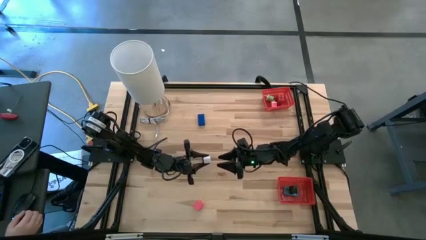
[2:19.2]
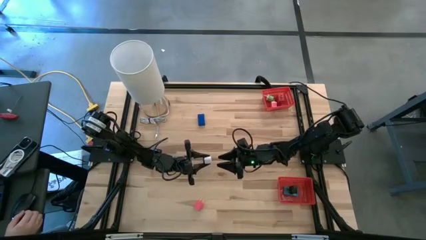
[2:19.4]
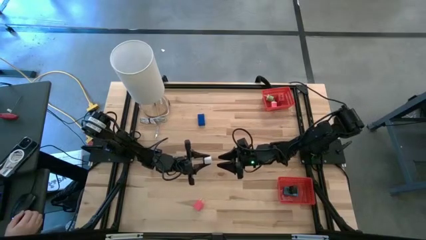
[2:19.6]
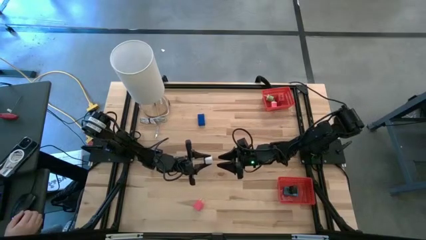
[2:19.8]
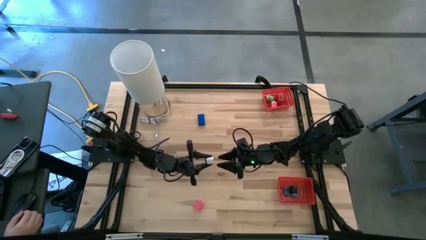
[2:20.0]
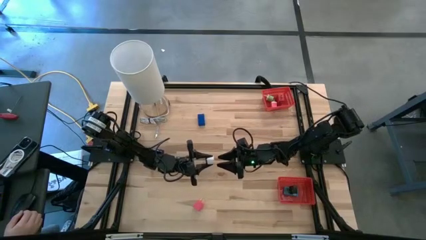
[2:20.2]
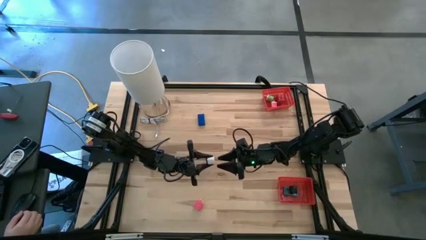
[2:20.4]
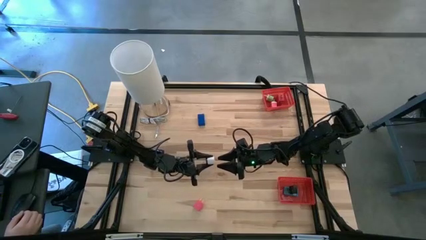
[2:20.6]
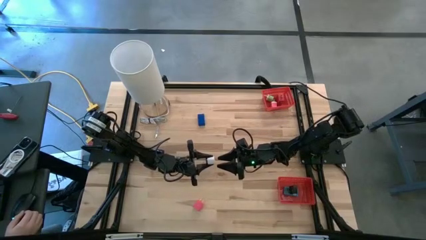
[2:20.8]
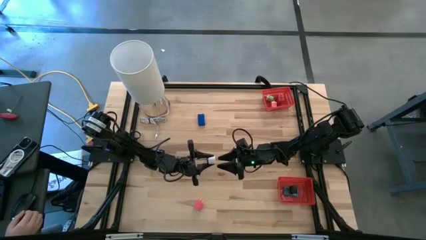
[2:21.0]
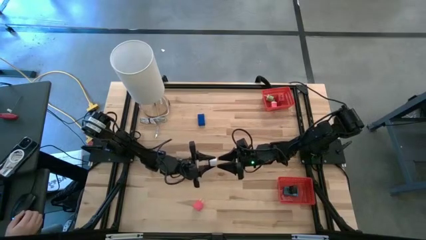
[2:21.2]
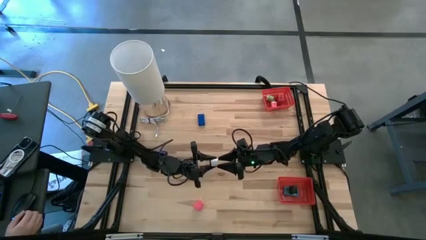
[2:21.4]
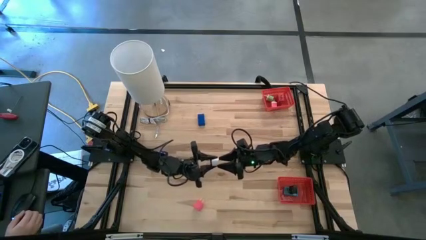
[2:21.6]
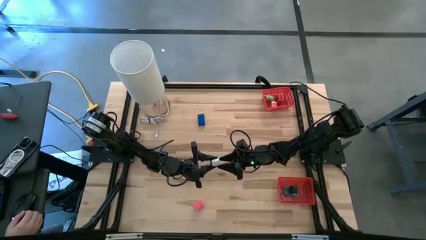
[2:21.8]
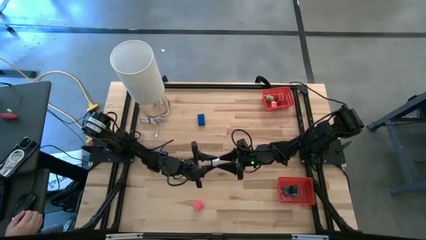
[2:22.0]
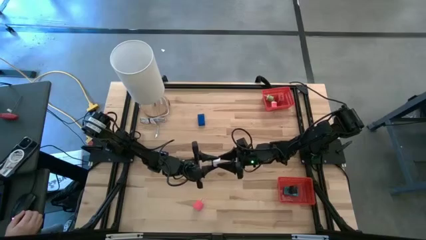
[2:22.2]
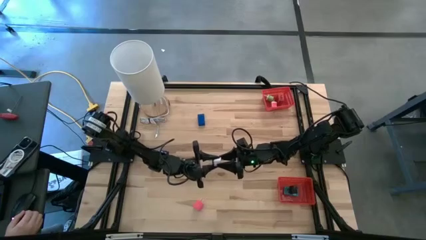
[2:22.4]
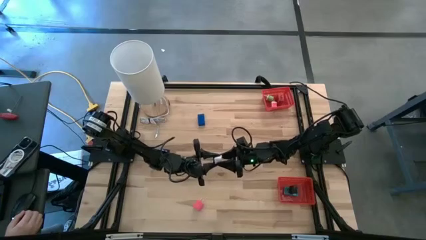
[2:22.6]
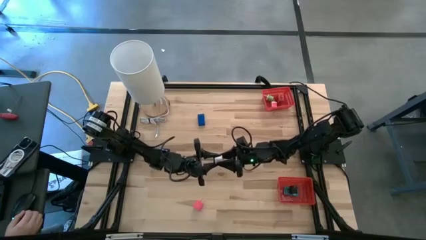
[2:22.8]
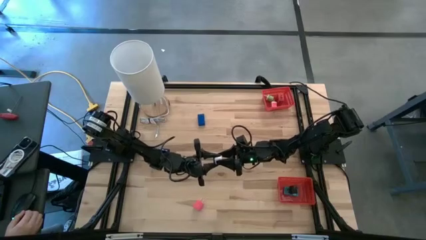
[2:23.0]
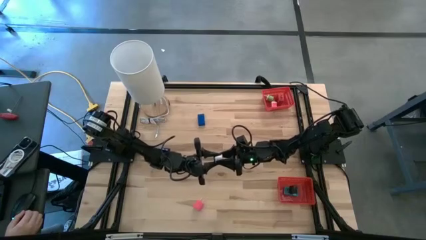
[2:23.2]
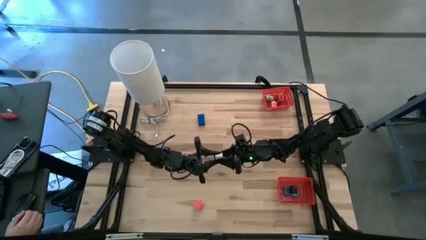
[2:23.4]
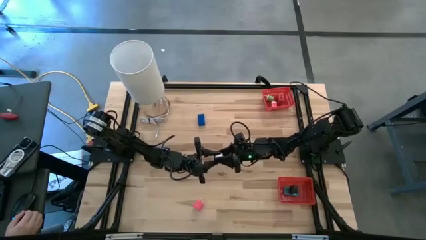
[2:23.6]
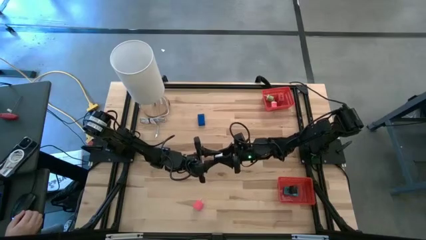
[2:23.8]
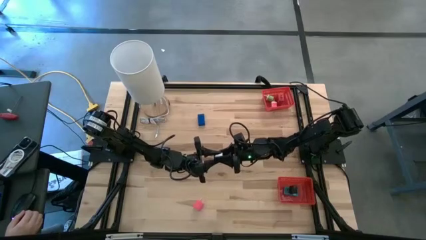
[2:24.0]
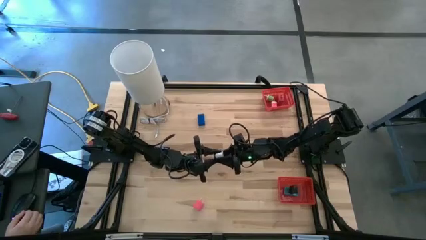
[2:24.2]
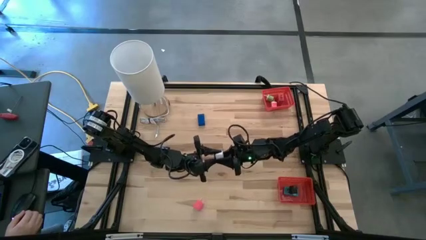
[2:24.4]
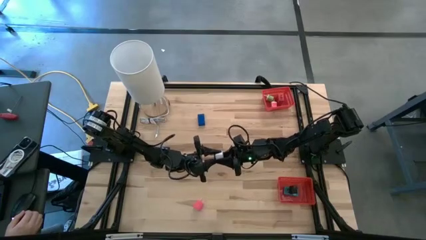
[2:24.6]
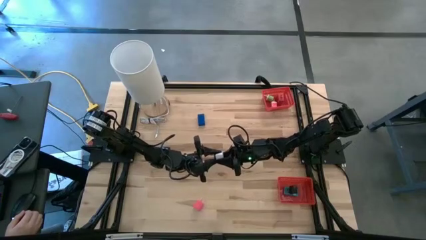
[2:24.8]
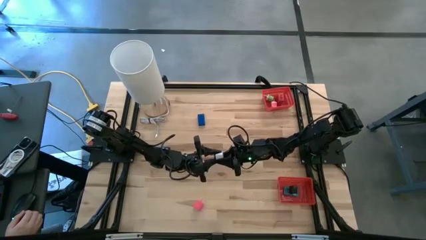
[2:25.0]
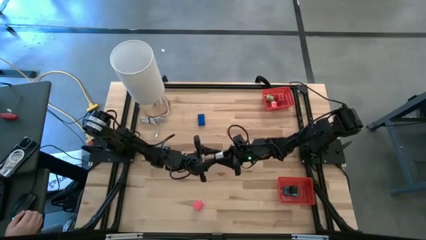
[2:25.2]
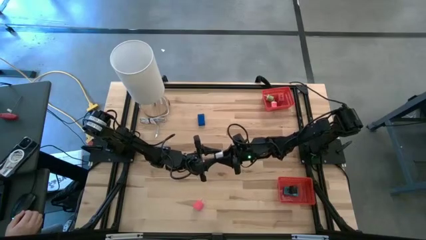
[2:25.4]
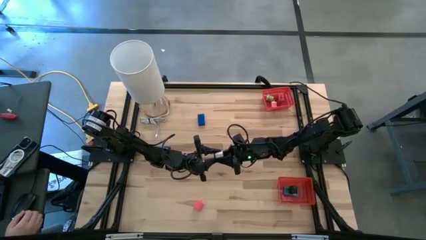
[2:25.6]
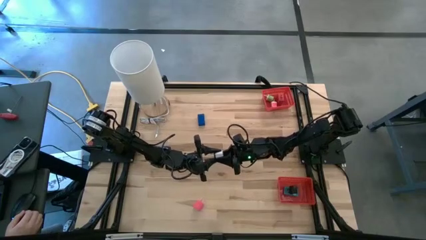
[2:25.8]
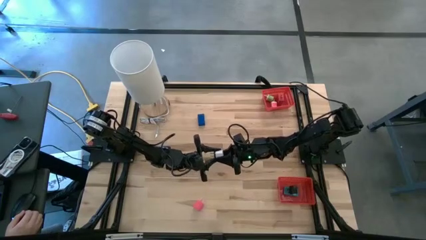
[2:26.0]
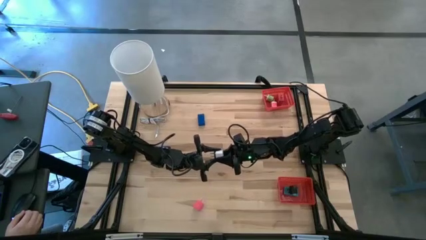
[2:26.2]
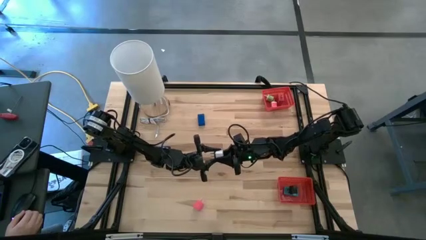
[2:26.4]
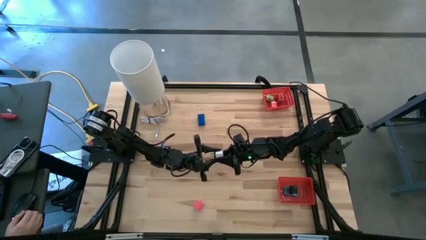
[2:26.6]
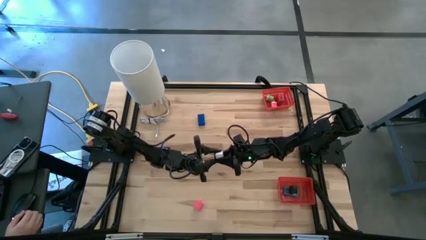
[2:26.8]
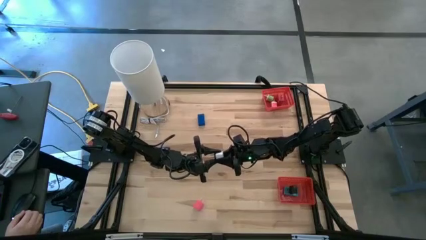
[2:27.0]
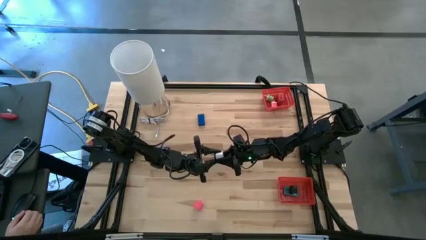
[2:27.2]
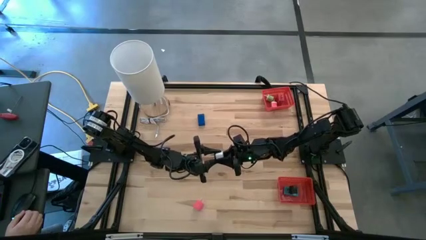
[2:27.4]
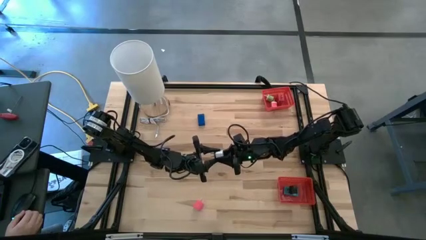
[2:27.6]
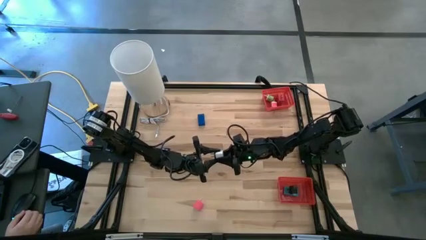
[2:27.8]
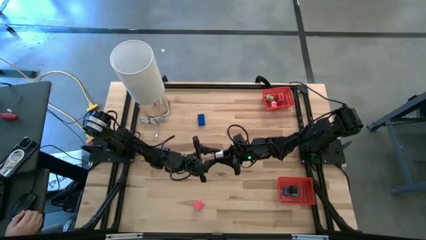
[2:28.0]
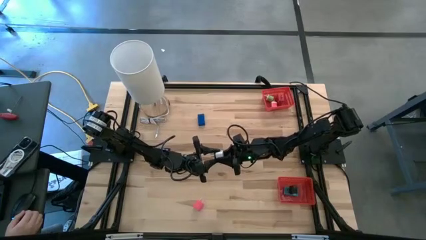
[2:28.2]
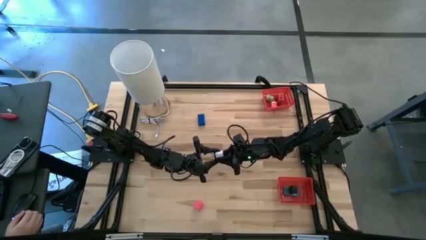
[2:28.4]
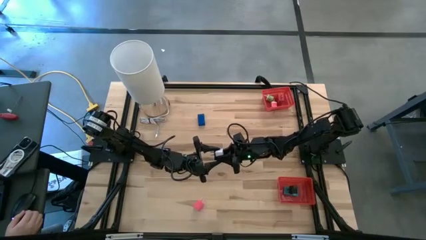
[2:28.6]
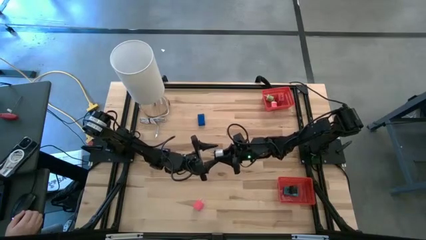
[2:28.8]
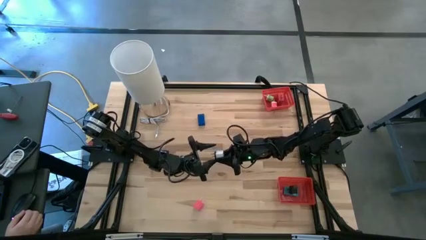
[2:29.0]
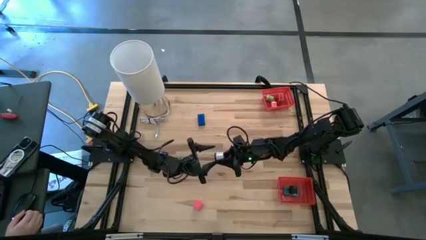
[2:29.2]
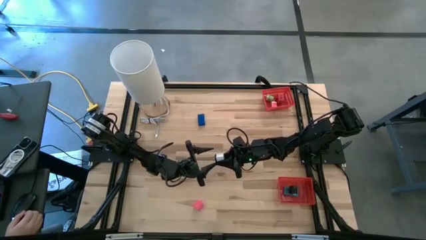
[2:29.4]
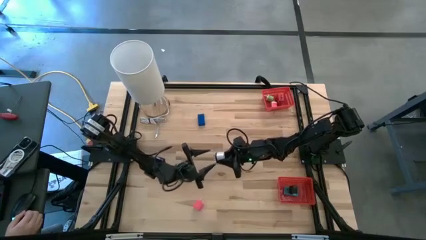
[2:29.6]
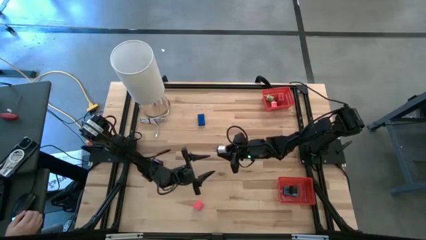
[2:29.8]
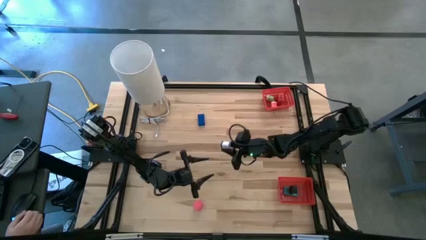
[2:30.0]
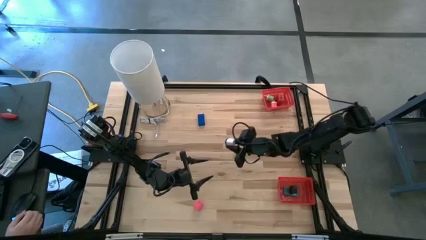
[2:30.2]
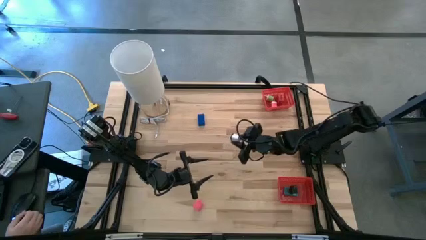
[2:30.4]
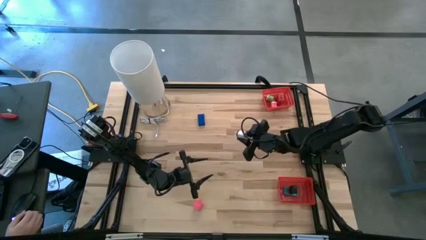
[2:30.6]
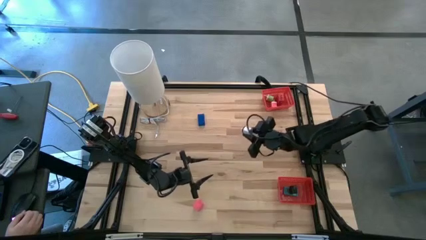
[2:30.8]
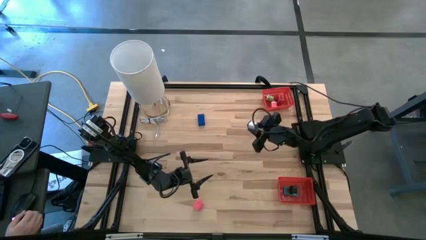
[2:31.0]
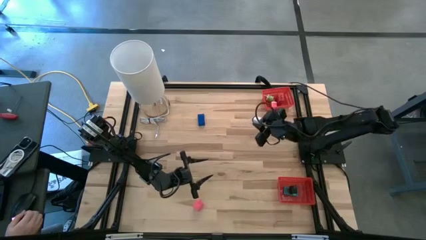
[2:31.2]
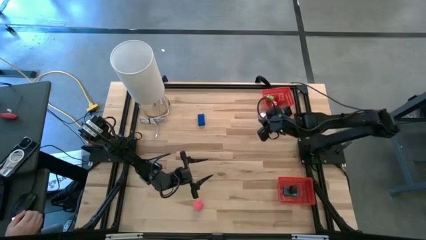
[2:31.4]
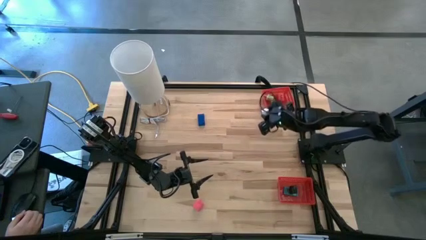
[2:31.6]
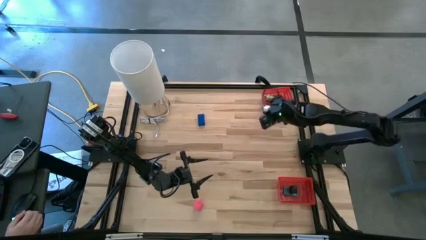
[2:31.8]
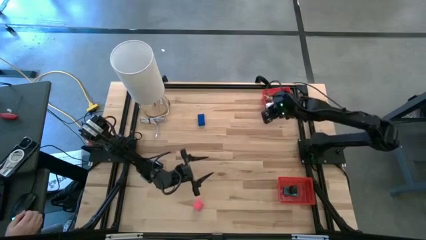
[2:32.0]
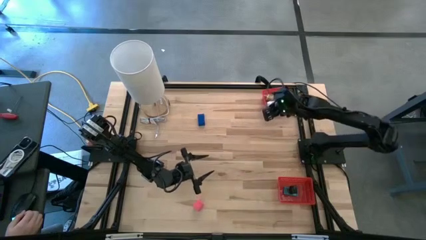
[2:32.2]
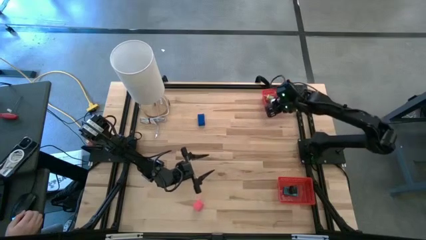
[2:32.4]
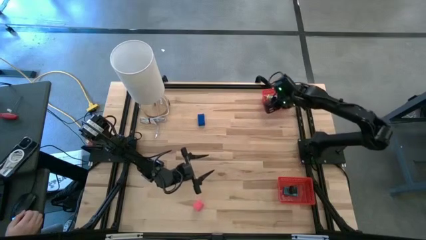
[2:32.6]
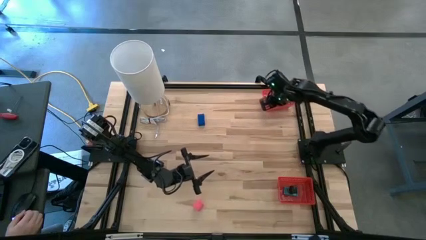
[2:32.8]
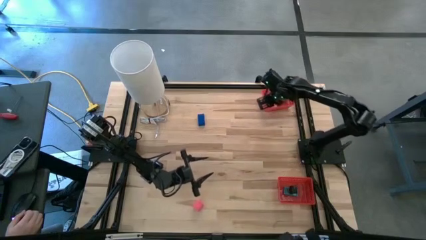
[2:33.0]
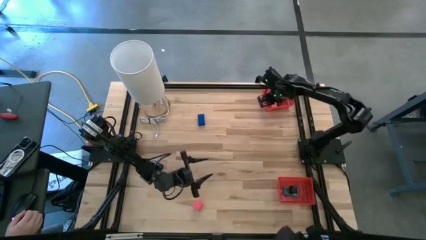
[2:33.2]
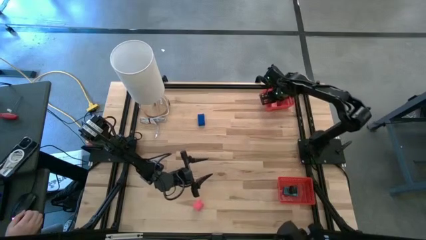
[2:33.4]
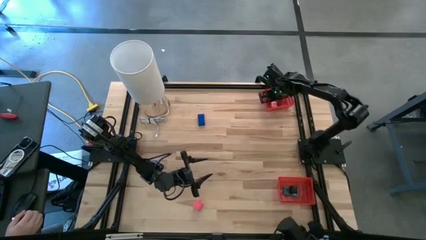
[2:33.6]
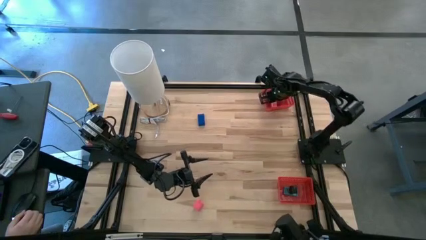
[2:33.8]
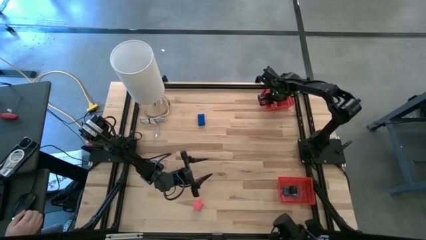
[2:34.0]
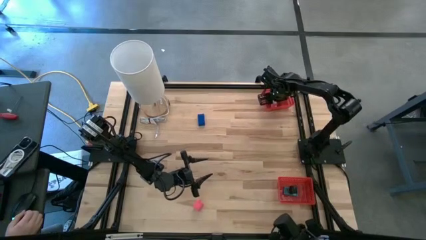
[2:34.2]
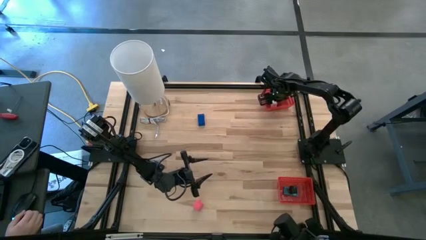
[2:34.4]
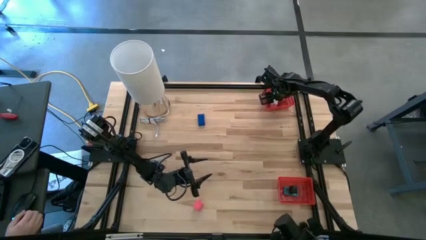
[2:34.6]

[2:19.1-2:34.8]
Task: Pick & Place Office items
Put the white charger adapter into the top red basket
